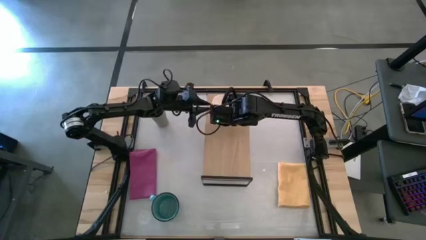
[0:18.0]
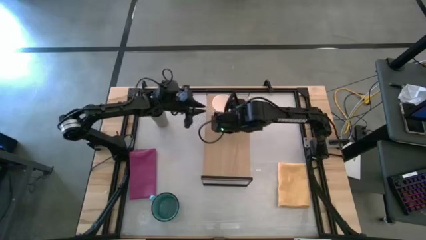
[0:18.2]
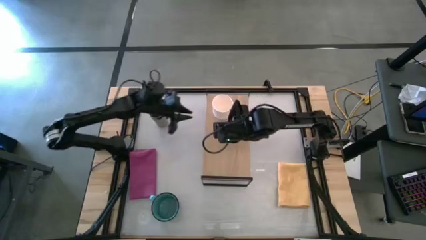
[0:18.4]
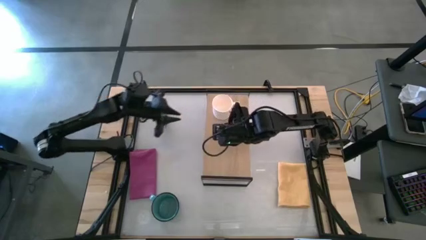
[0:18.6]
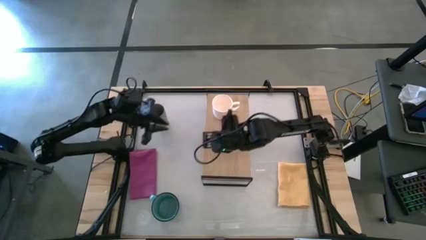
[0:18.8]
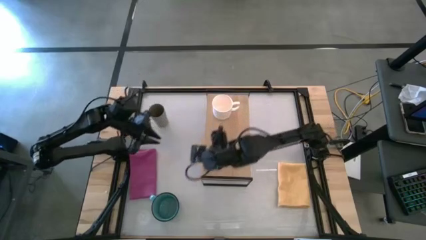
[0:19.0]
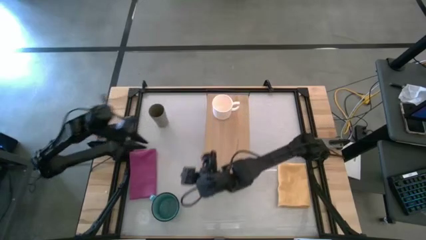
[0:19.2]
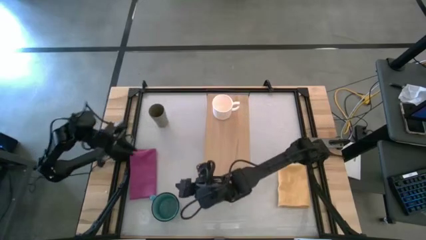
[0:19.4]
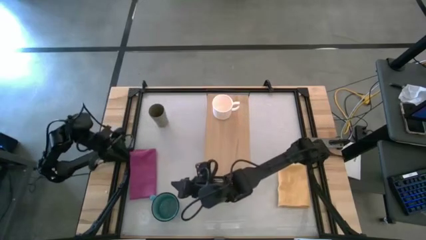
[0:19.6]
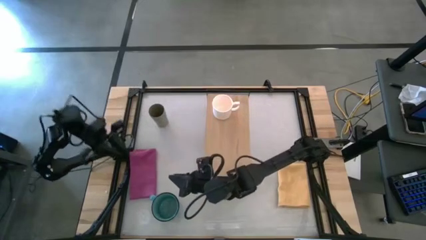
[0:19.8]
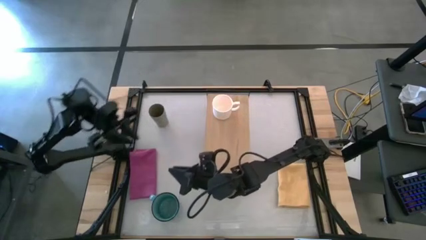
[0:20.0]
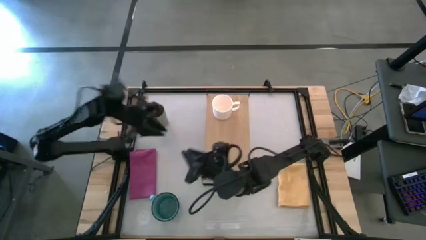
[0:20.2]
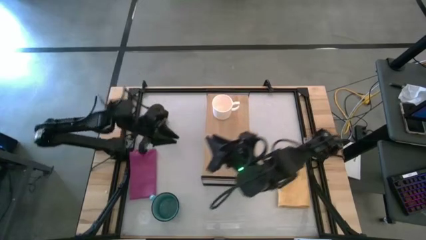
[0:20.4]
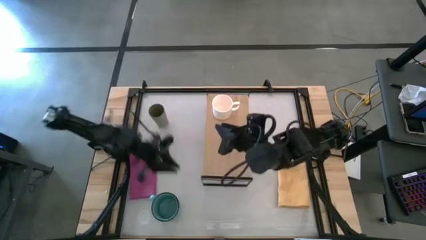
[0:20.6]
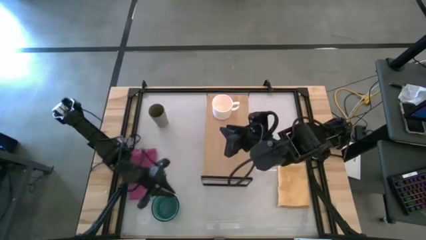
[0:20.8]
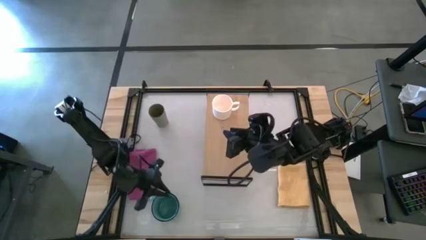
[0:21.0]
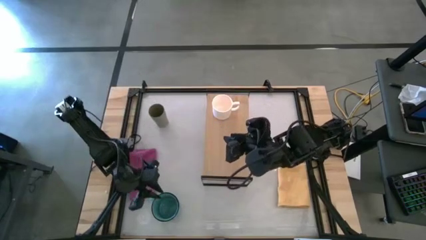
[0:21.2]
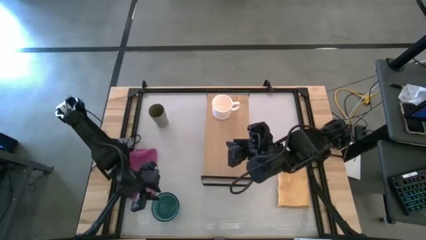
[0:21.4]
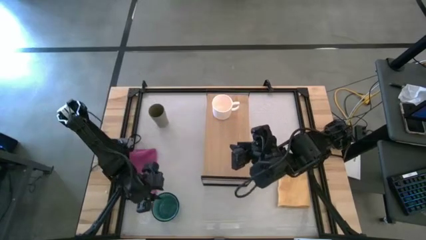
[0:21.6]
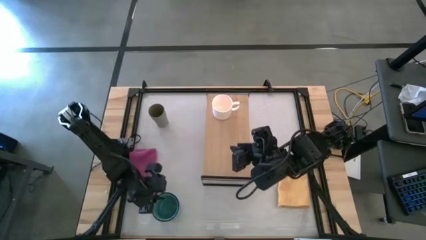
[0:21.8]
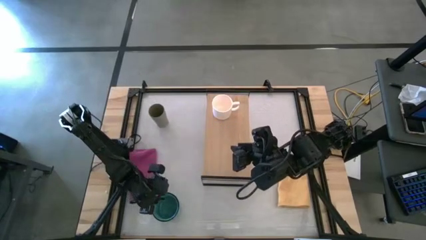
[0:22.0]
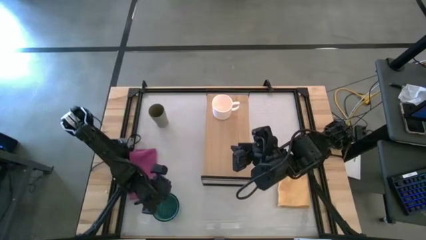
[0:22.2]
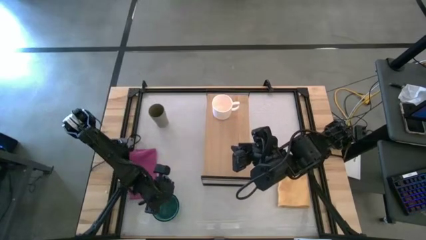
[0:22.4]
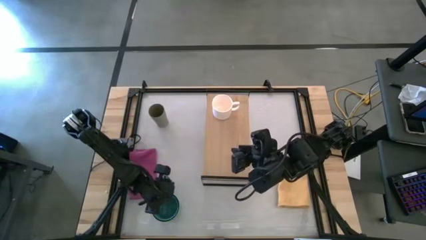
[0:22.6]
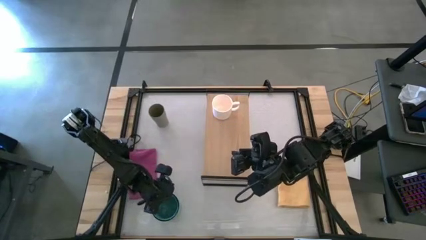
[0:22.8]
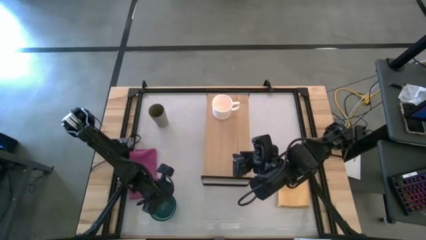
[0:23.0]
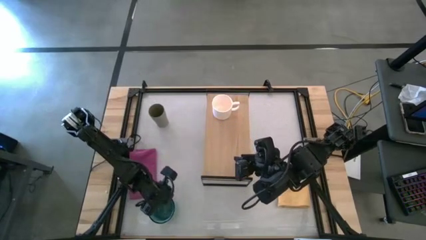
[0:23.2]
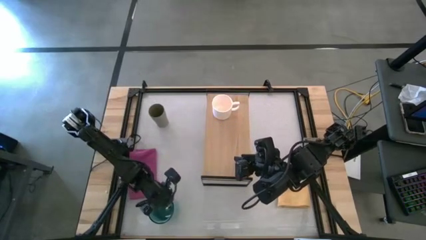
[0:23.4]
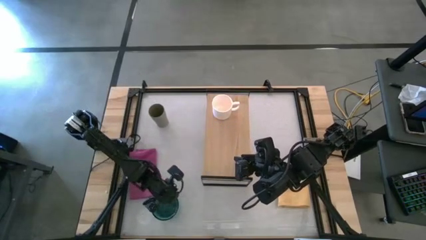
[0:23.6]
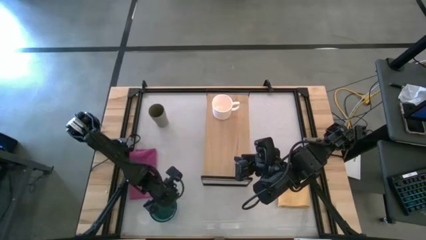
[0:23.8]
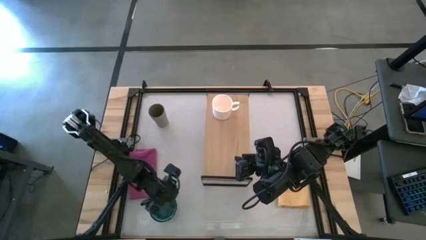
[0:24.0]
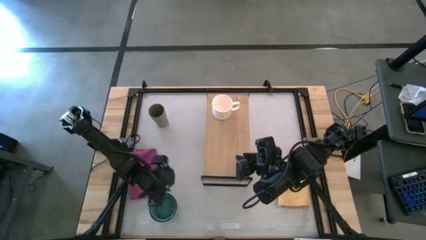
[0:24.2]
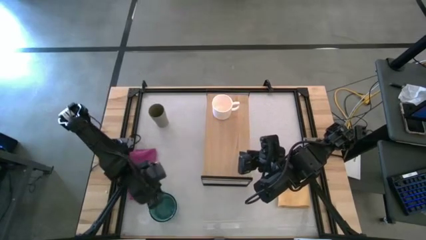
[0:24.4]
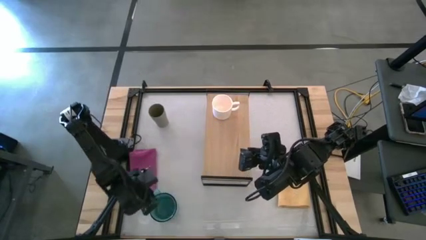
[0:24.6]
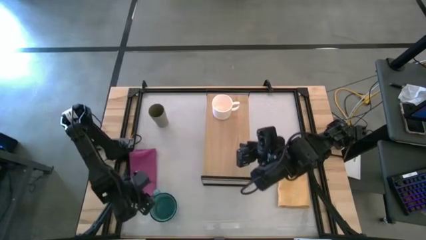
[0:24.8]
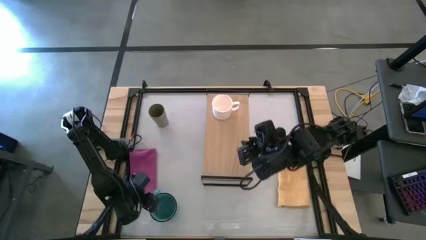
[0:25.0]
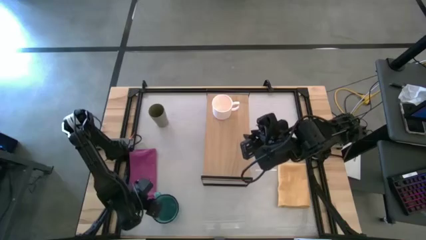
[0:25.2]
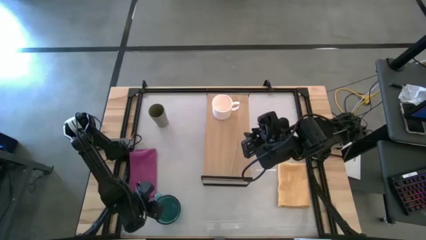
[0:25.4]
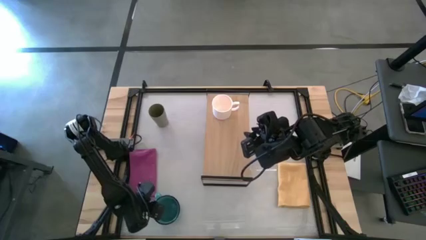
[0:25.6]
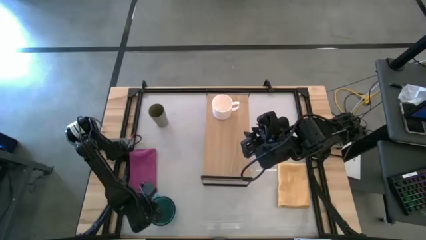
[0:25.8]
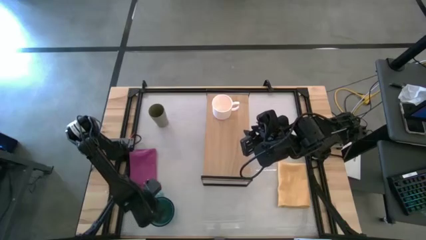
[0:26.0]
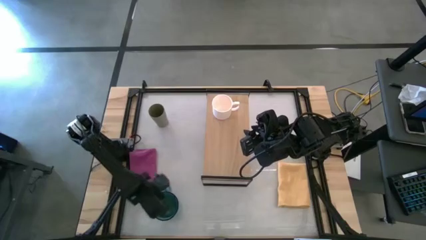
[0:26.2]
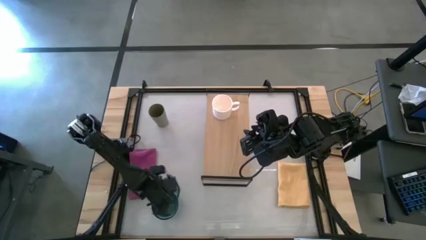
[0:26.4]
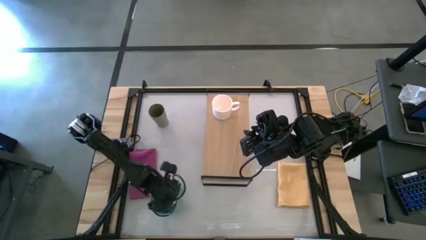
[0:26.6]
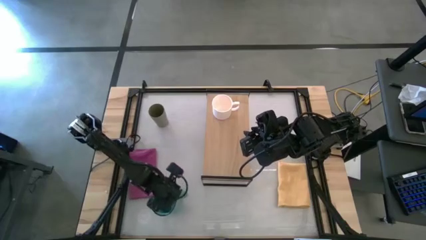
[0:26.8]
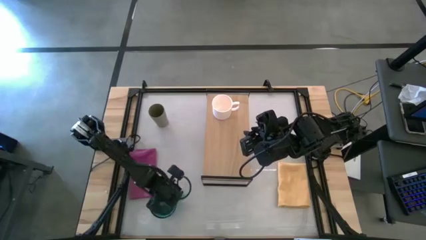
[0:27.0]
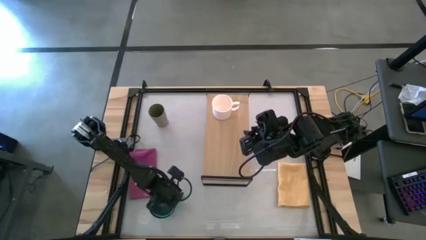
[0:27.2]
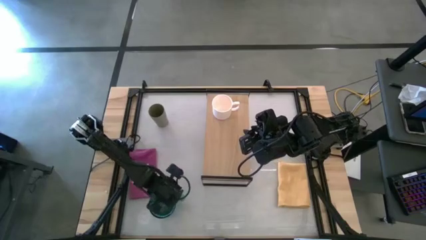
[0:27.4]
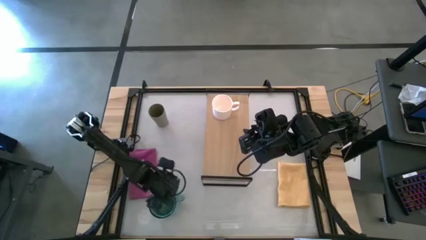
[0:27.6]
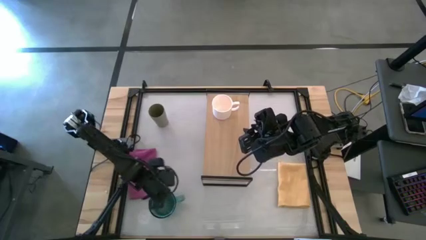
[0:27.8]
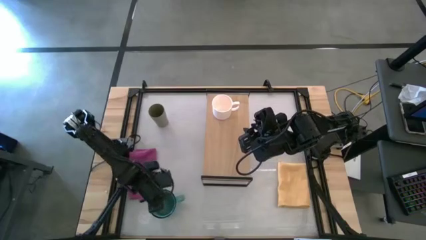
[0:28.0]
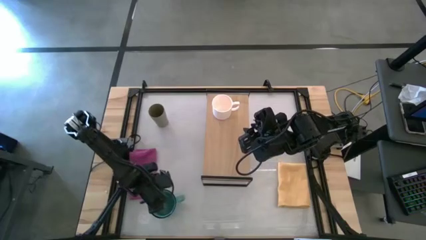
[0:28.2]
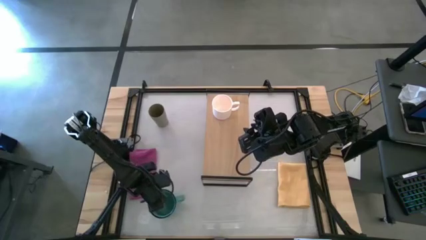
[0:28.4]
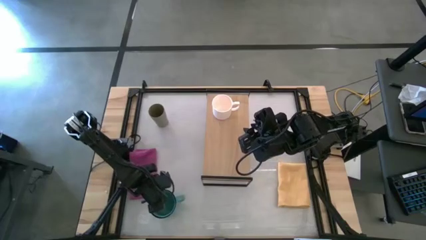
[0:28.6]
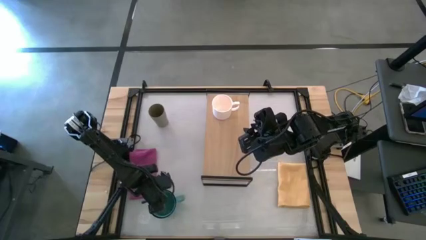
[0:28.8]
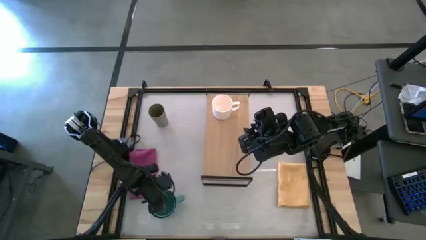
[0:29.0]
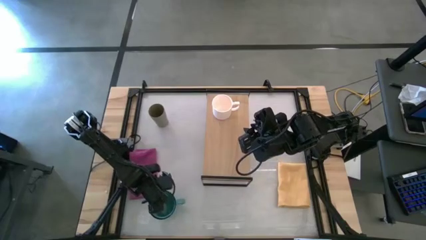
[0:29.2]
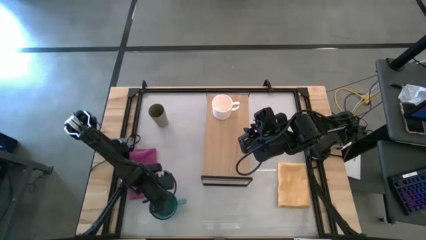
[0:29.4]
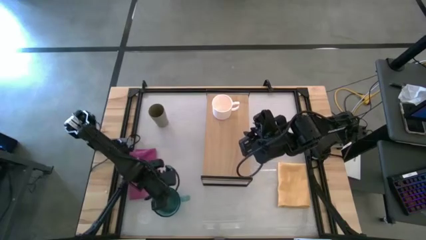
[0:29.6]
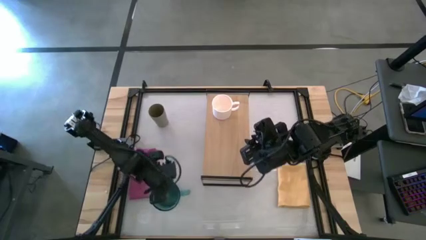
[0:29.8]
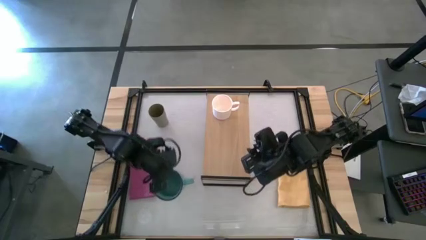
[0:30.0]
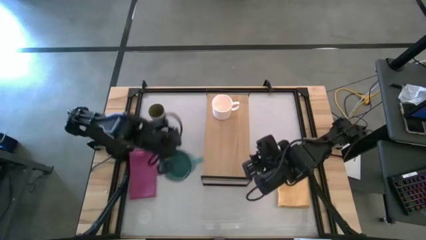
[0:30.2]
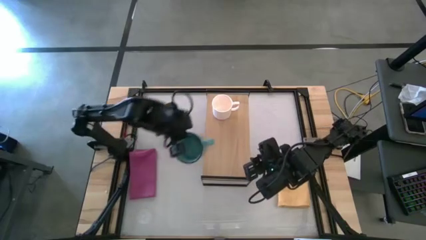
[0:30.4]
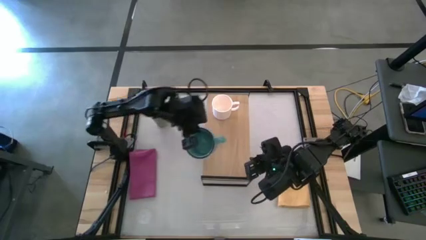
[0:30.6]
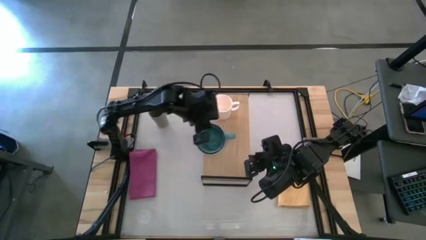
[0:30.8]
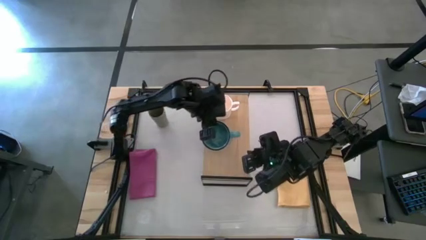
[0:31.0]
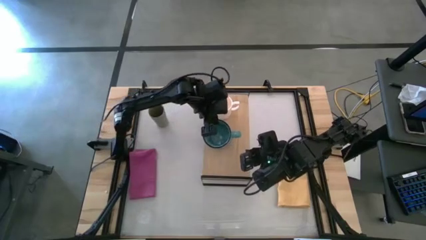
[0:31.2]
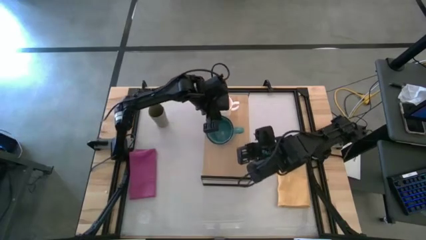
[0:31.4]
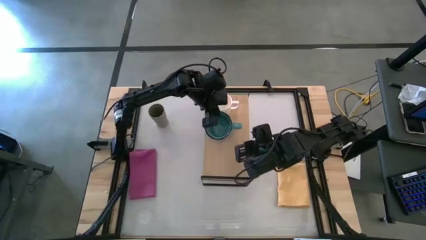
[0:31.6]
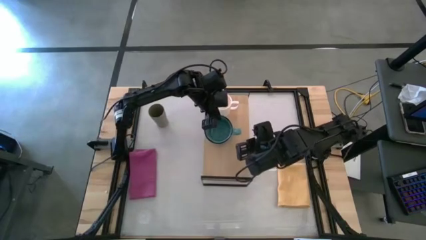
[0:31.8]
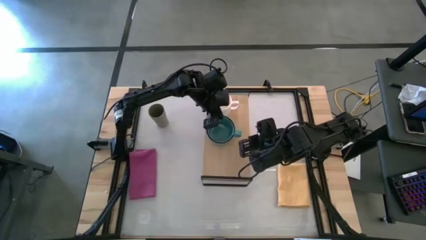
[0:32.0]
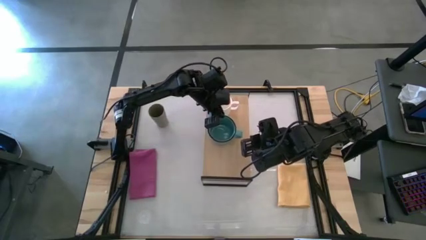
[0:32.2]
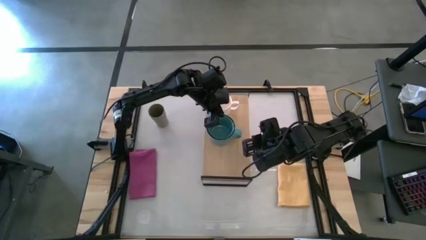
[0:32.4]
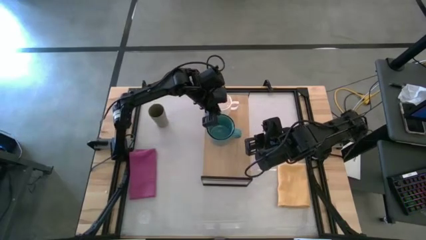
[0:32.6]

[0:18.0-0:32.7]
Task: Stack small to large cups/mugs on shelf
Put the blue mug on the shelf

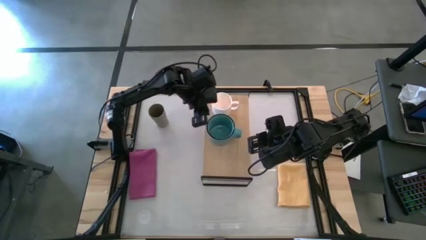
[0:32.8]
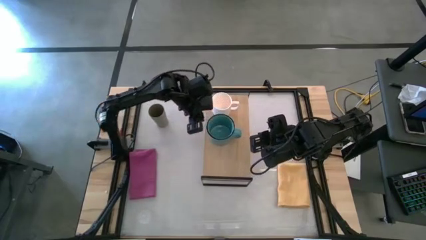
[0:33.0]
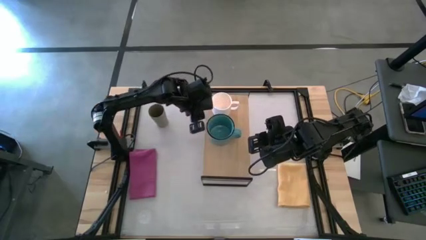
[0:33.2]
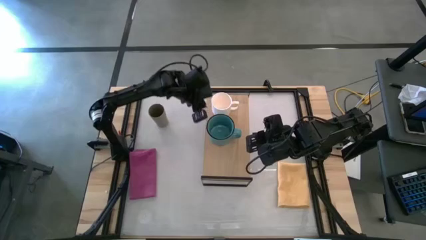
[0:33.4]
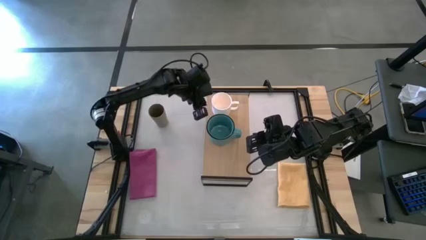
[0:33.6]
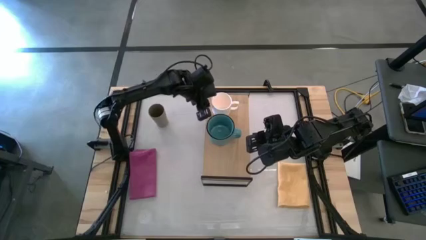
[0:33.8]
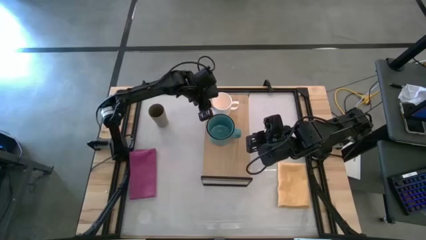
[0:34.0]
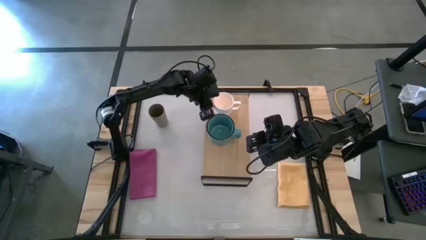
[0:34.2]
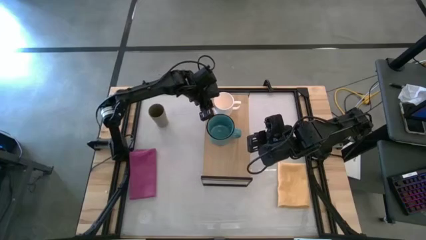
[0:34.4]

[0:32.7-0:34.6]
Adjust the white mug on the shelf

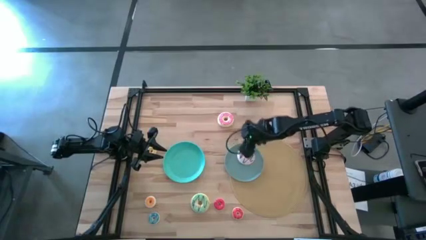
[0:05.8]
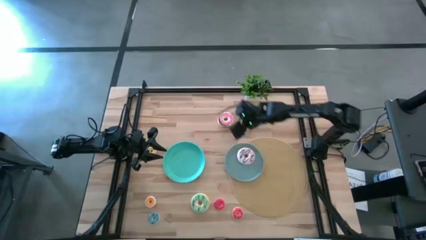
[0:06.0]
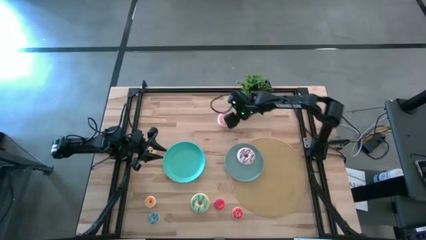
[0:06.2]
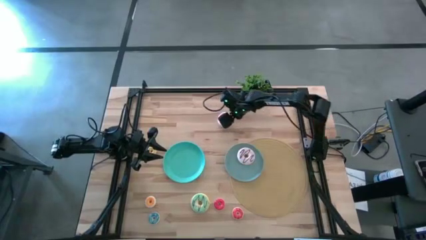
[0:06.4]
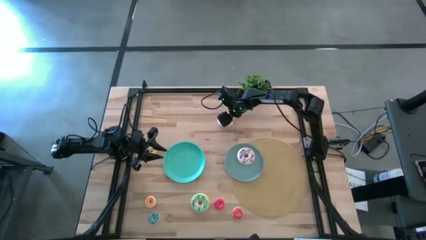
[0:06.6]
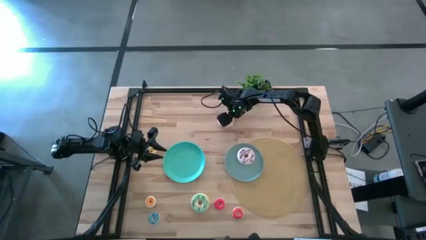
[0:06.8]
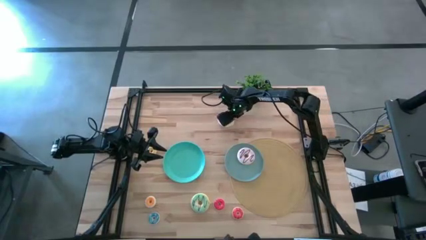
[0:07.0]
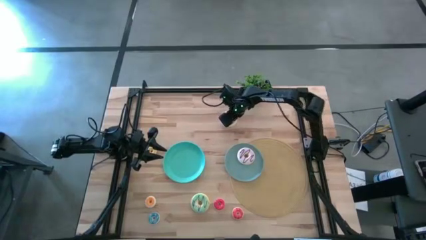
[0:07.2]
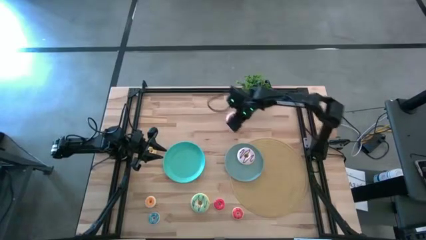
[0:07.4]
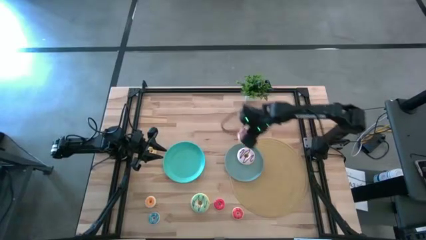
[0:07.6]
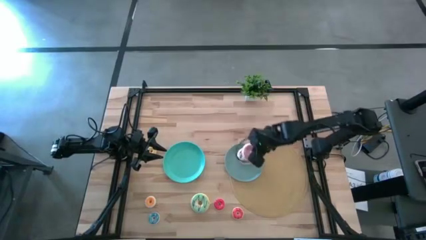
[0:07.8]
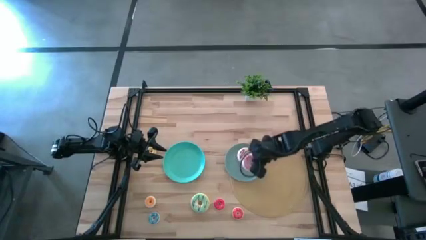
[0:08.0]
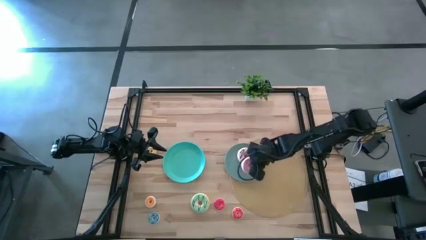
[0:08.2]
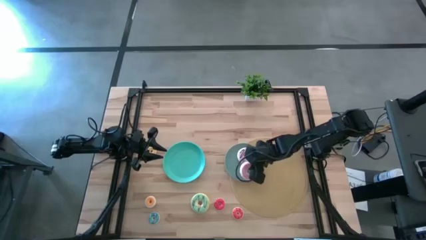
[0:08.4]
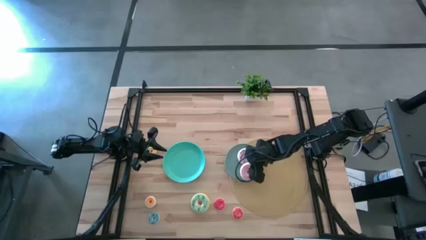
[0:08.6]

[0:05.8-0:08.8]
Task: Pick & Place donuts
Put the large pink donut on the blue plate
